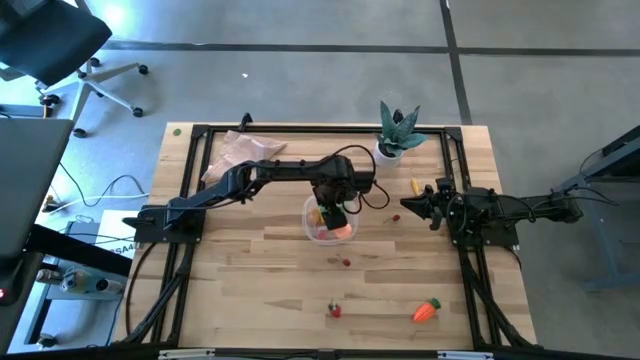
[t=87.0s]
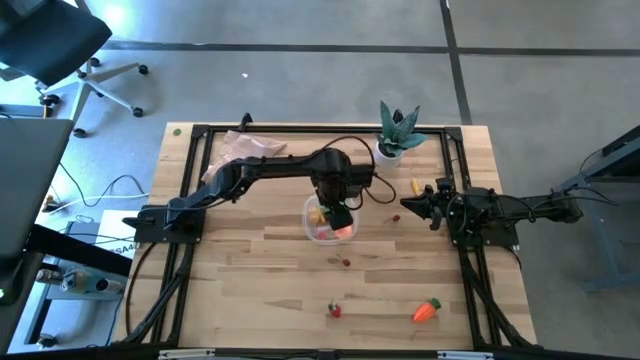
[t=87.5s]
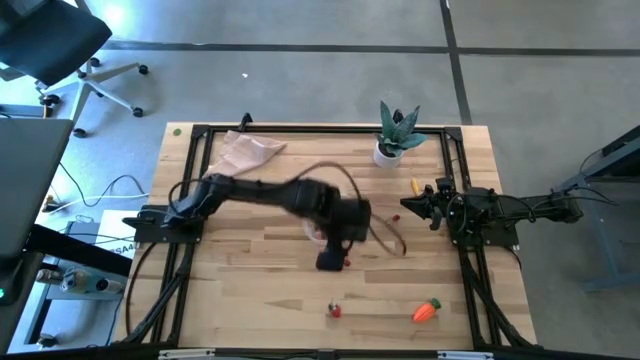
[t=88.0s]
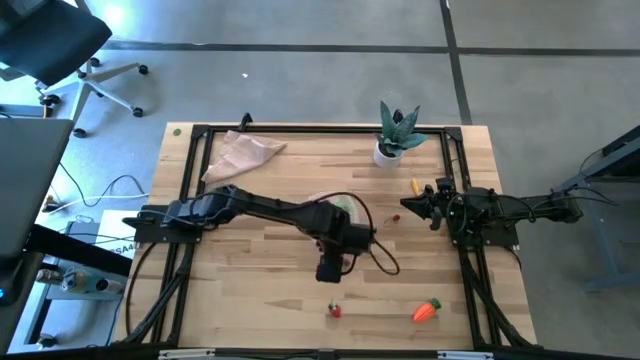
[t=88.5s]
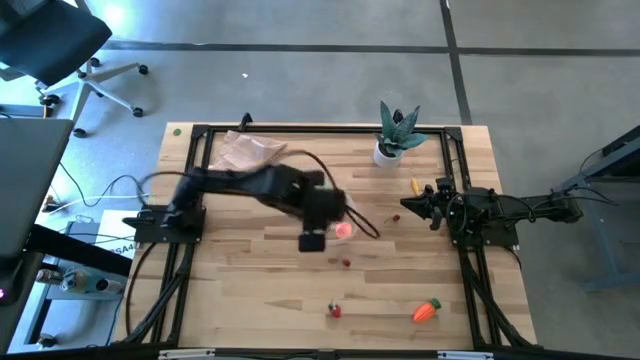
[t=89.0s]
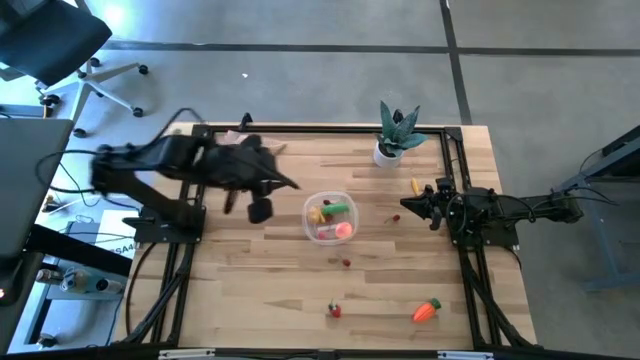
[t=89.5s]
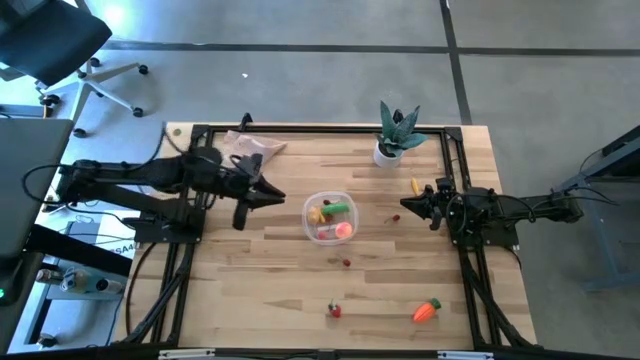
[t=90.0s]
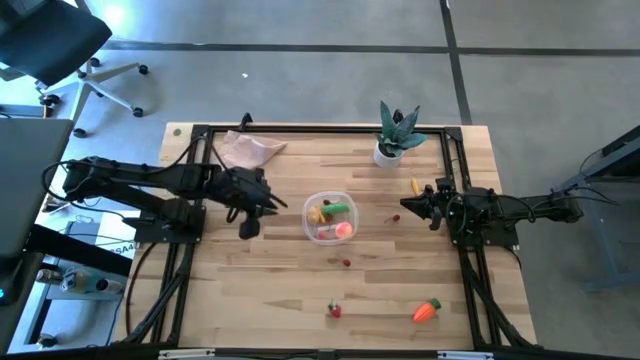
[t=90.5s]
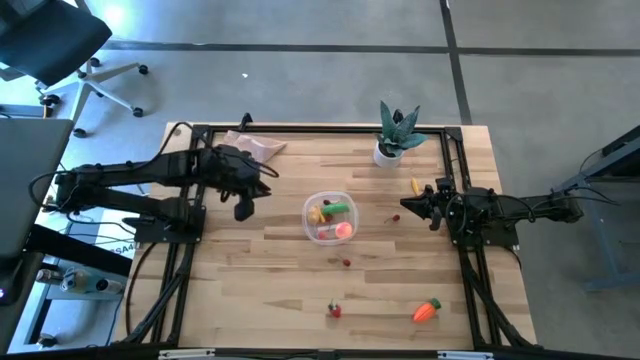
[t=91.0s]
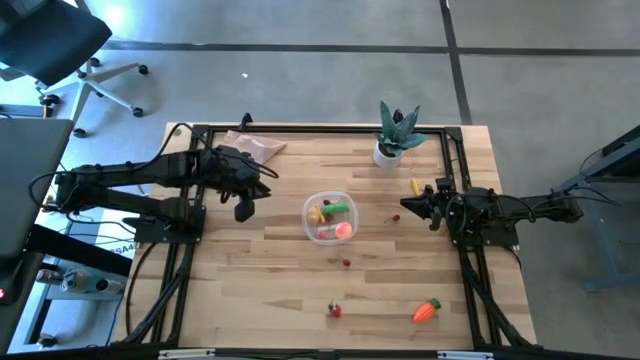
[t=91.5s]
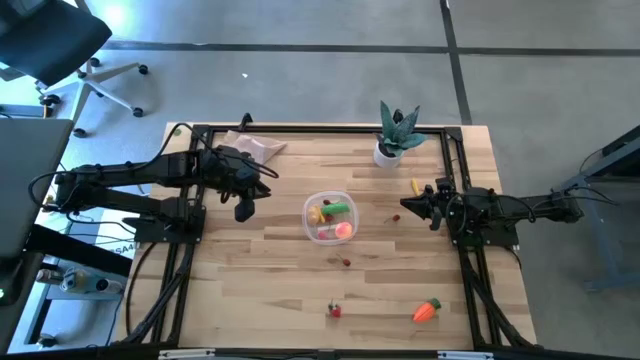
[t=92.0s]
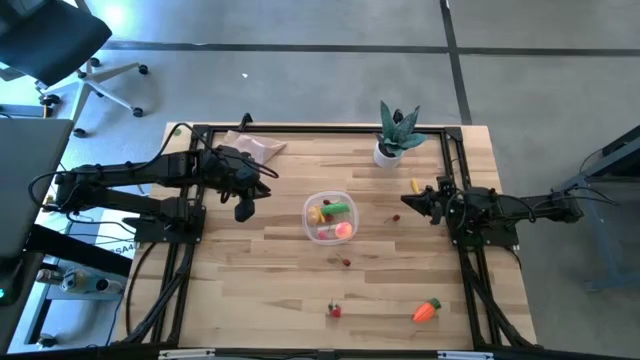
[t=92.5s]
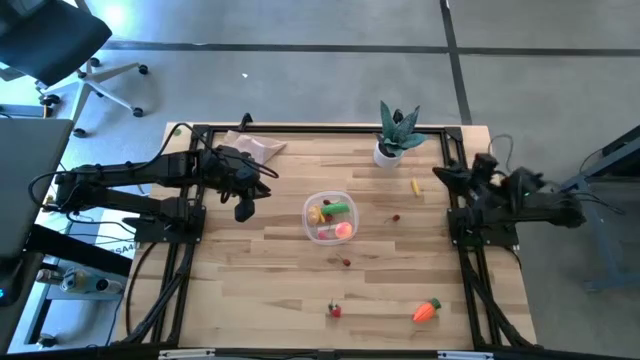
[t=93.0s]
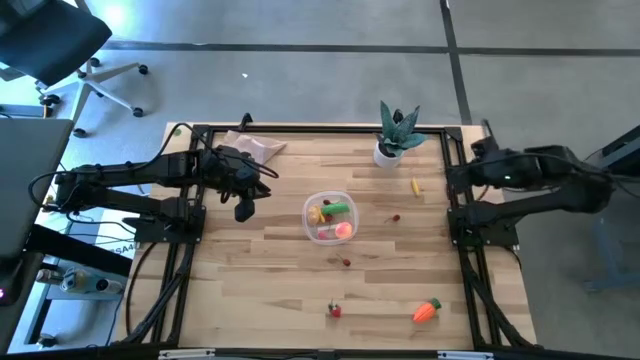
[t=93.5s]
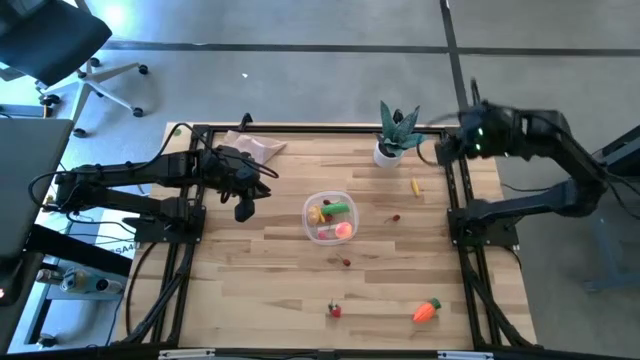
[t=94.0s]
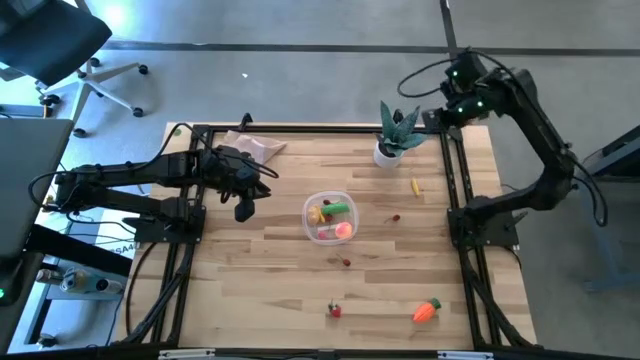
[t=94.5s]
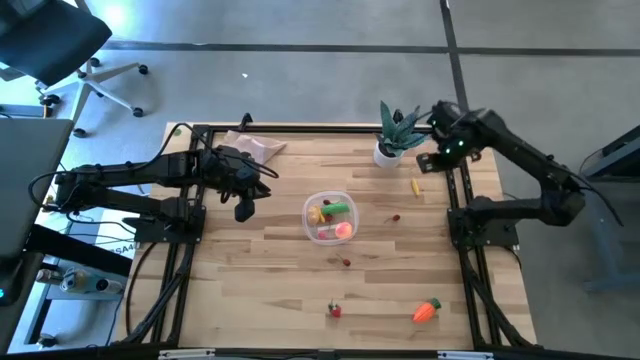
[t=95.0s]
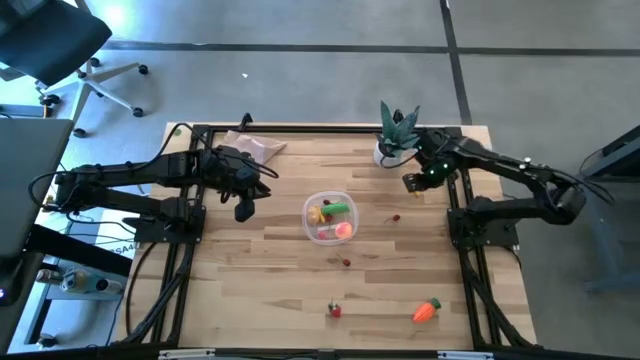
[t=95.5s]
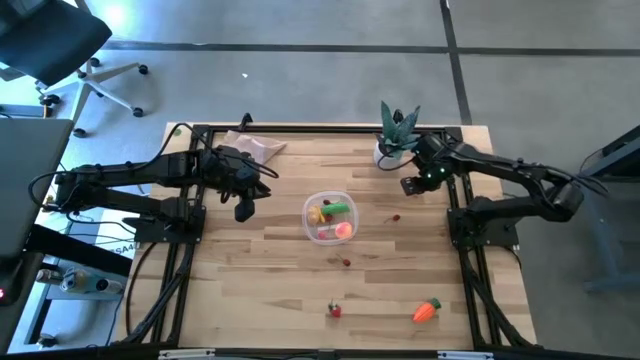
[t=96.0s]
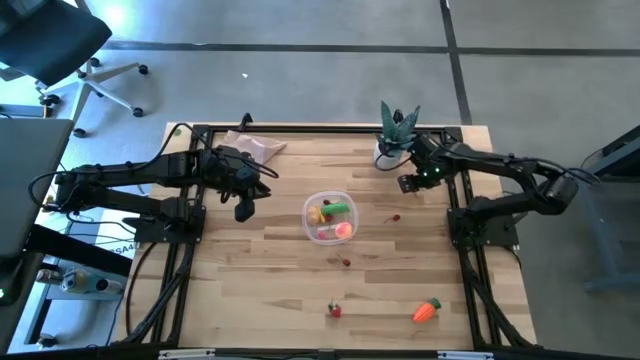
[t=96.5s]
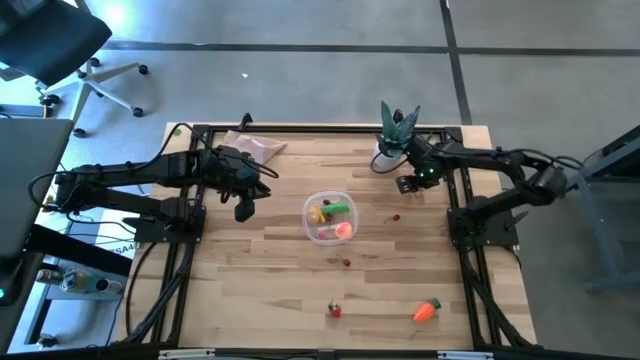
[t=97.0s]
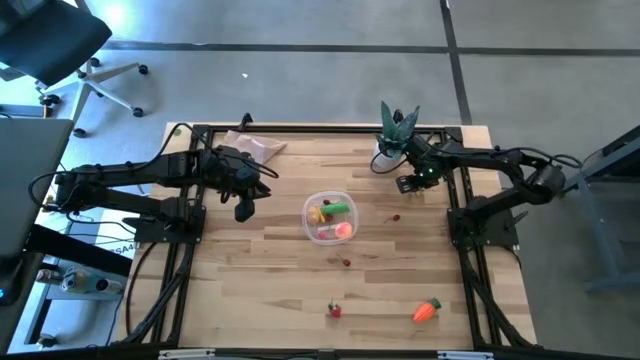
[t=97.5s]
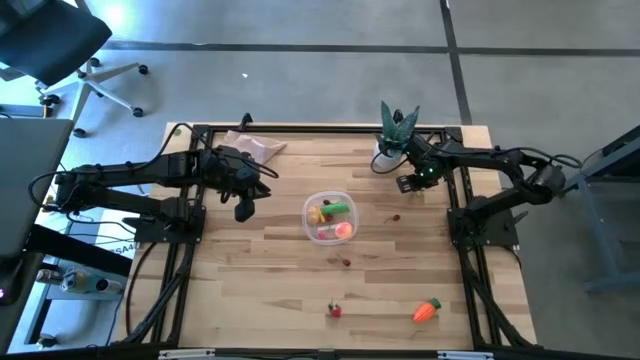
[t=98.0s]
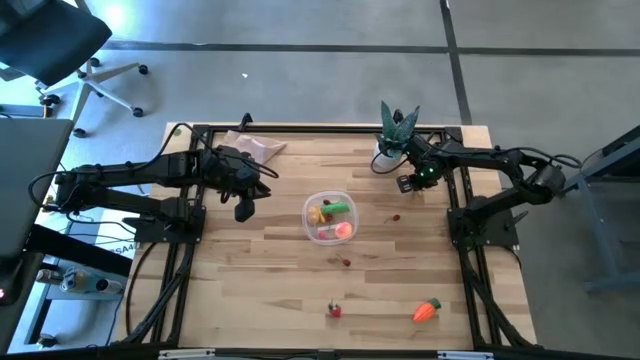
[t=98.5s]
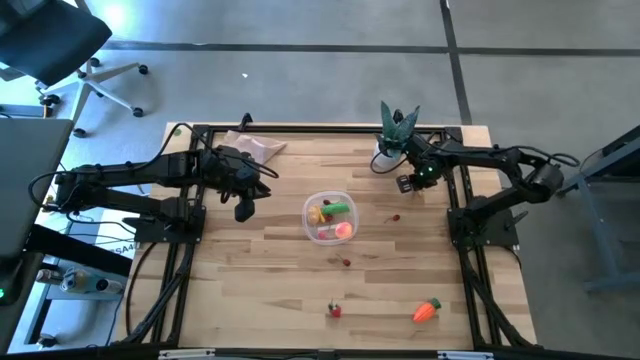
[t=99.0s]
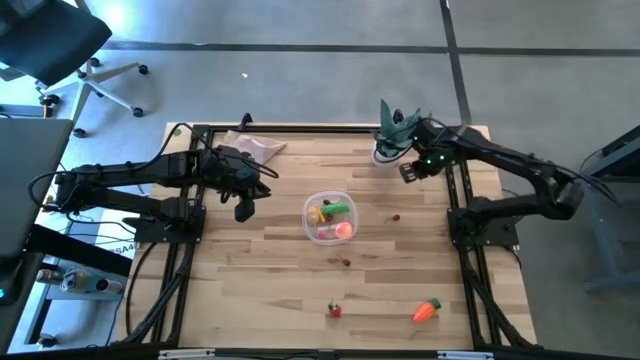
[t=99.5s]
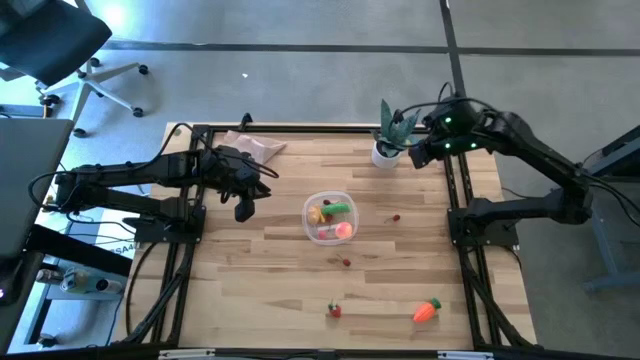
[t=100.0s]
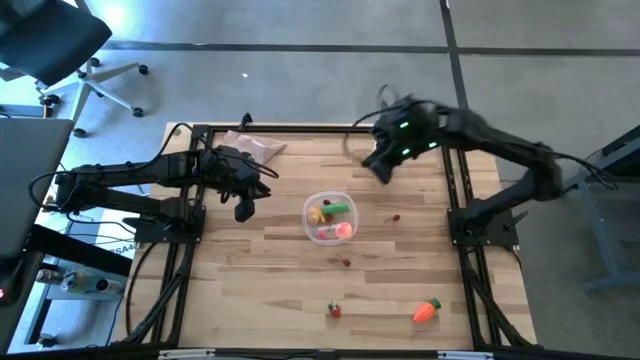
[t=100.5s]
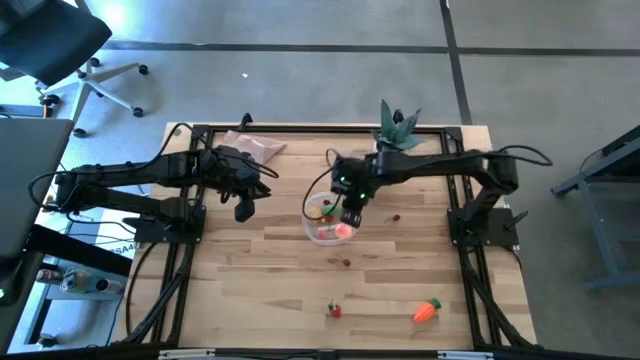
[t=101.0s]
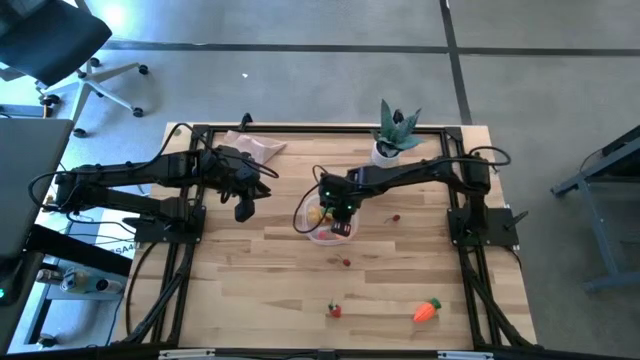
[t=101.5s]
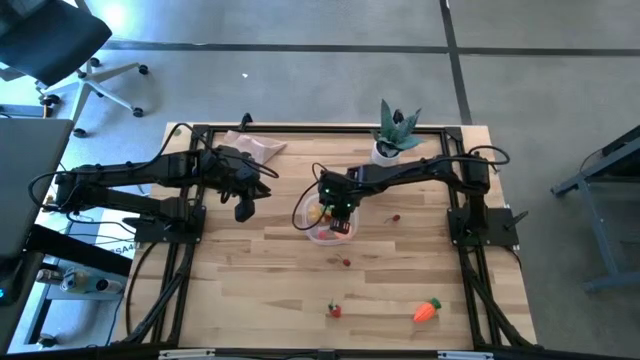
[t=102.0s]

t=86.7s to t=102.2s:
Task: Pick and placing Produce into tupperware
Put the corn into the transparent bin

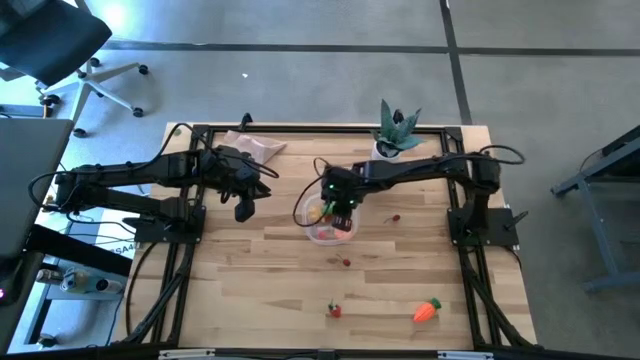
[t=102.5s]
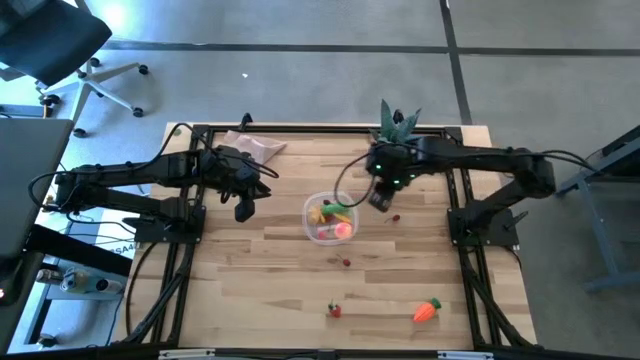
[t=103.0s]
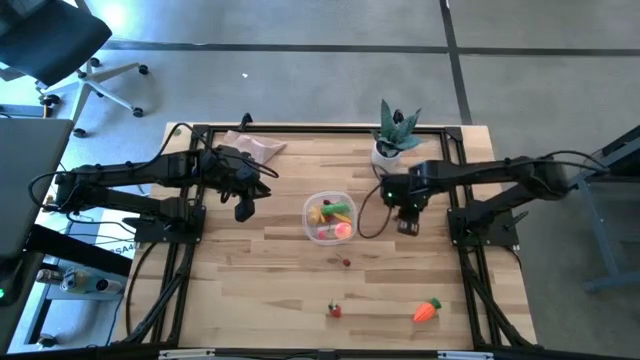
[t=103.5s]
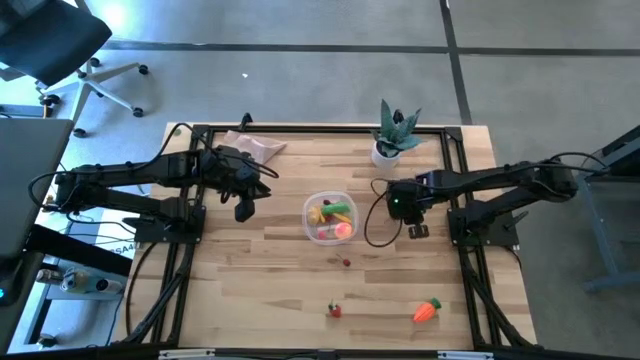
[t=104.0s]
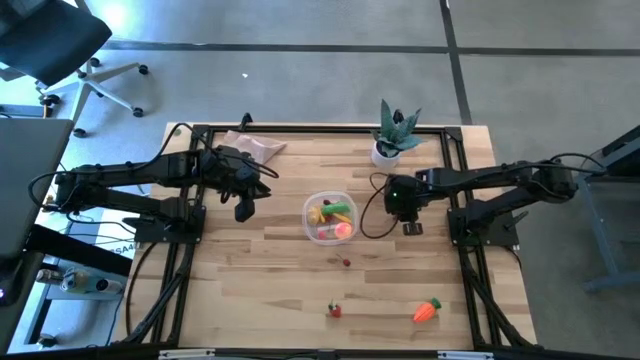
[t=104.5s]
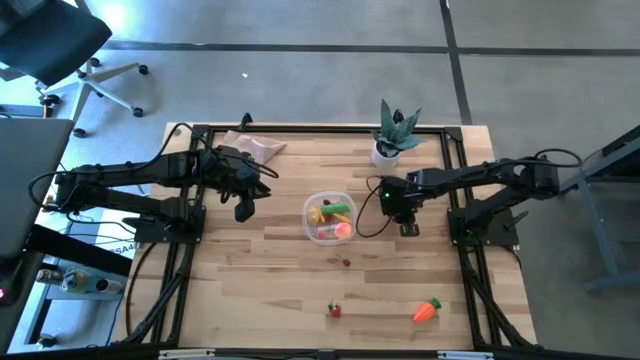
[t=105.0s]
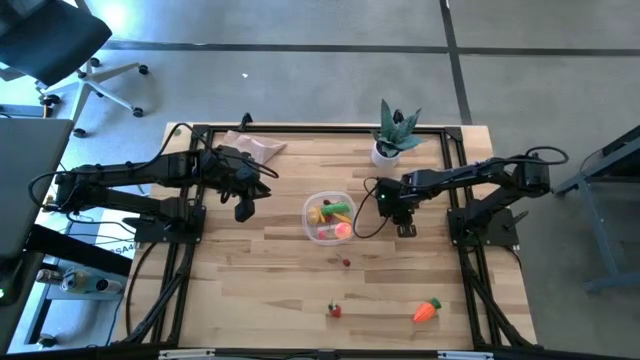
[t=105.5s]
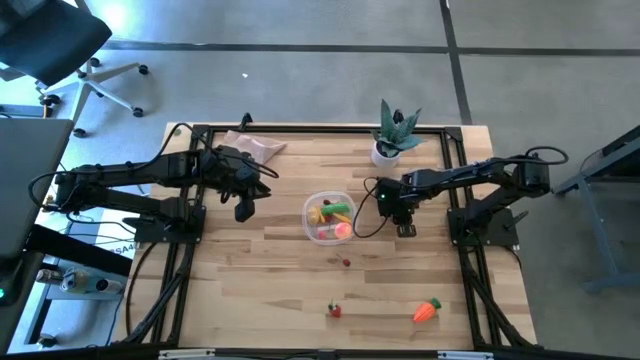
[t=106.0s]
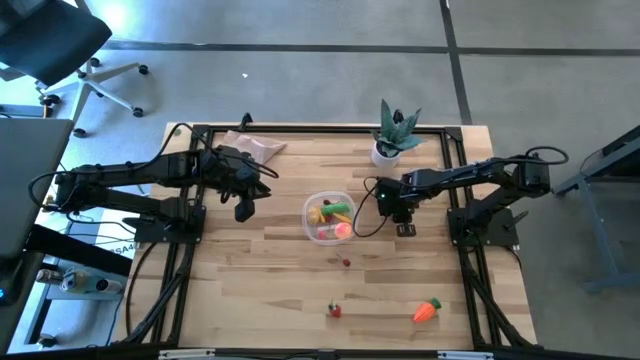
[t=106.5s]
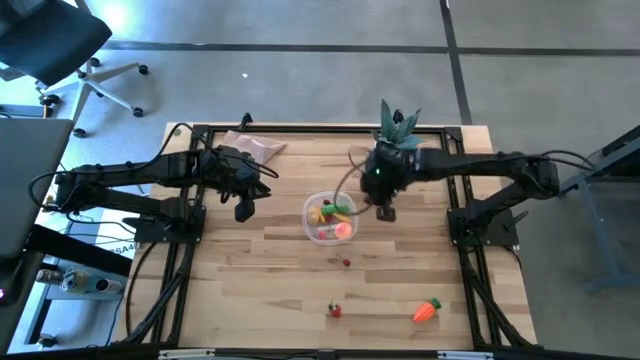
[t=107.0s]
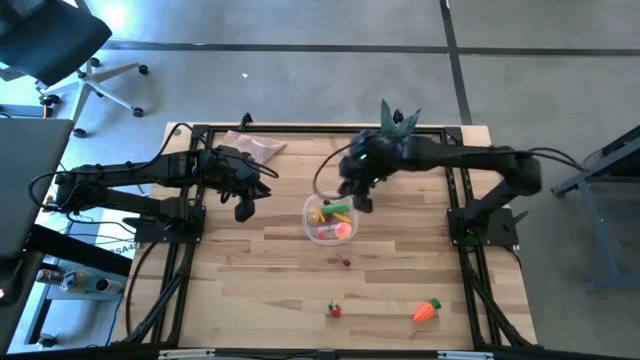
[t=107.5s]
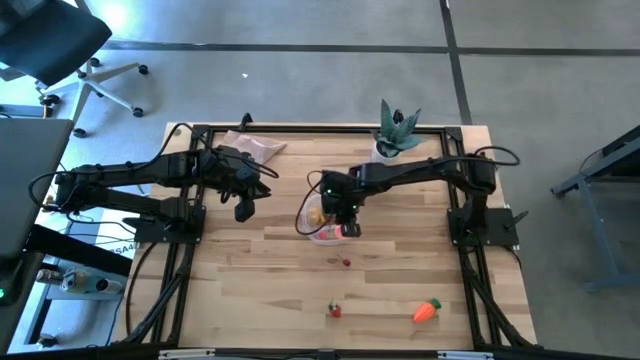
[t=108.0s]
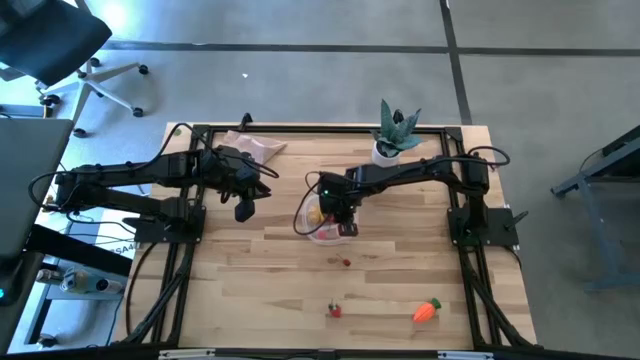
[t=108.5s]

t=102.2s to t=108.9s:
Put the red cherry into the transparent bin
